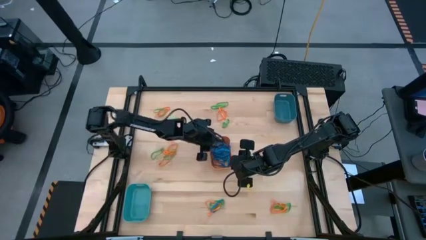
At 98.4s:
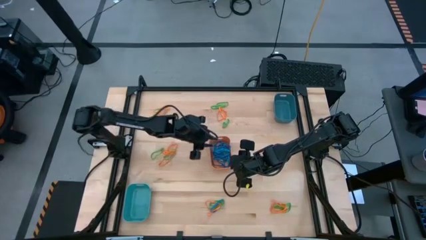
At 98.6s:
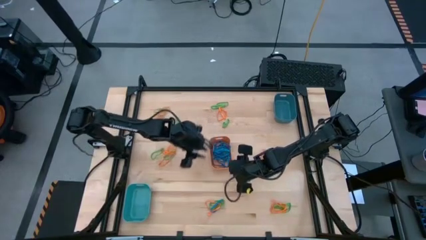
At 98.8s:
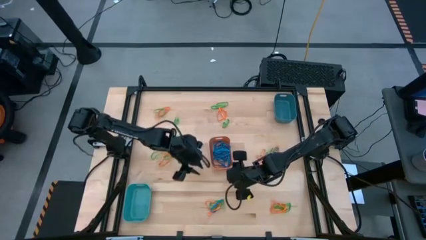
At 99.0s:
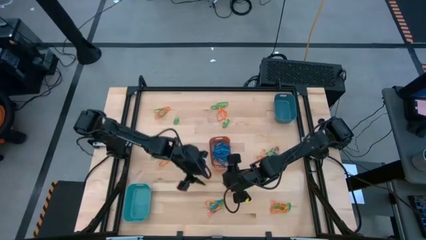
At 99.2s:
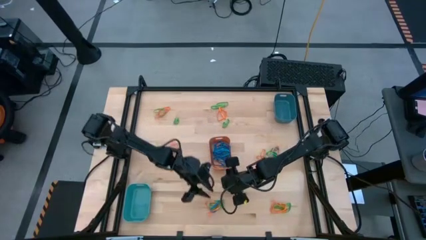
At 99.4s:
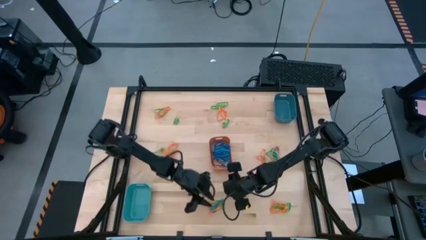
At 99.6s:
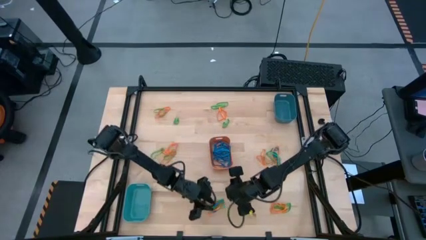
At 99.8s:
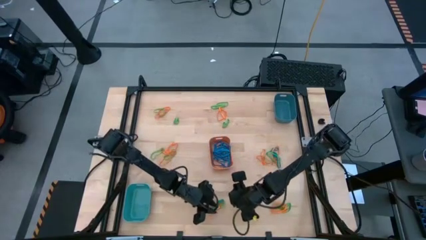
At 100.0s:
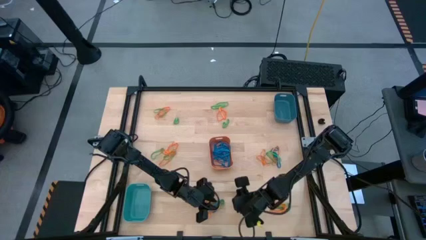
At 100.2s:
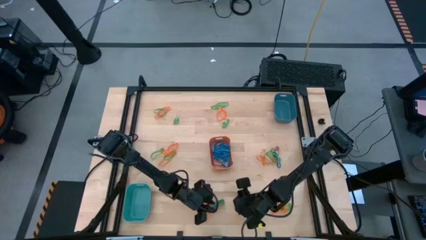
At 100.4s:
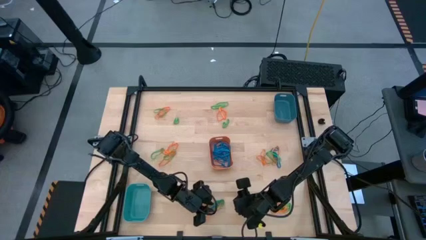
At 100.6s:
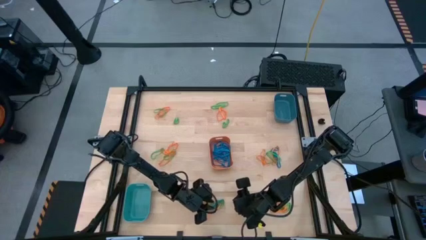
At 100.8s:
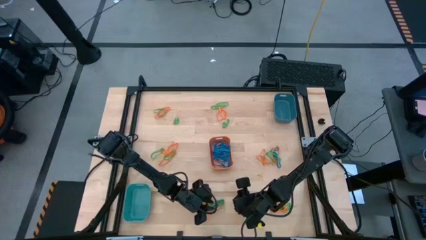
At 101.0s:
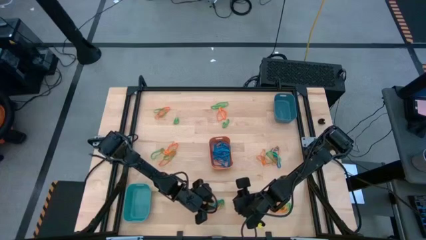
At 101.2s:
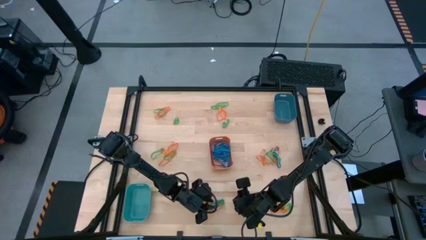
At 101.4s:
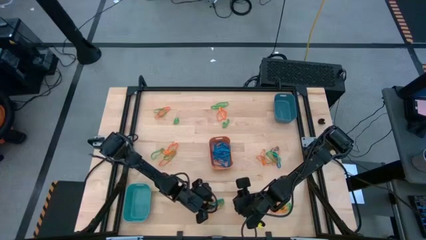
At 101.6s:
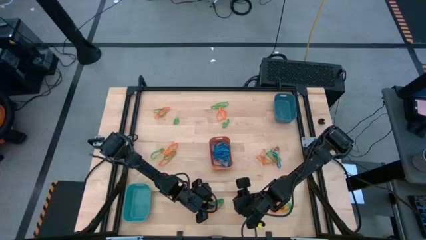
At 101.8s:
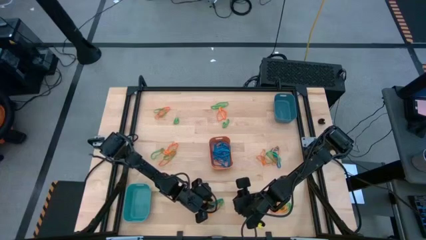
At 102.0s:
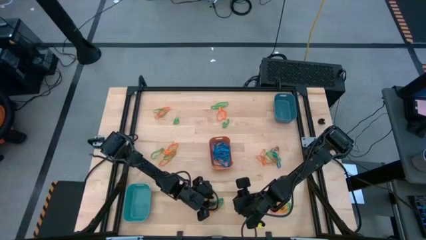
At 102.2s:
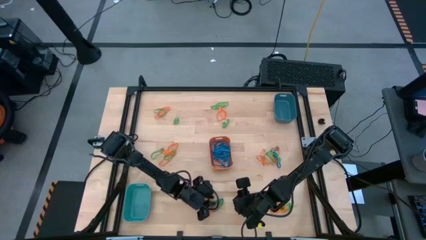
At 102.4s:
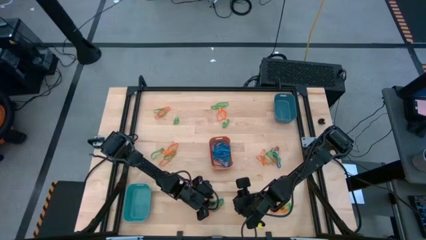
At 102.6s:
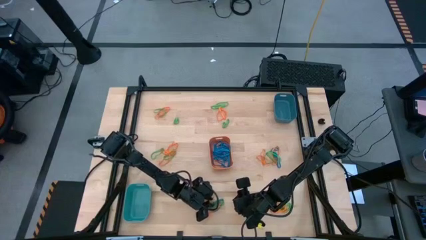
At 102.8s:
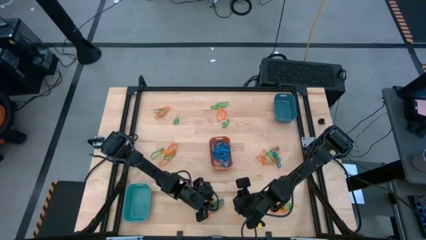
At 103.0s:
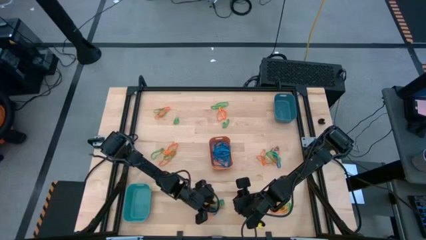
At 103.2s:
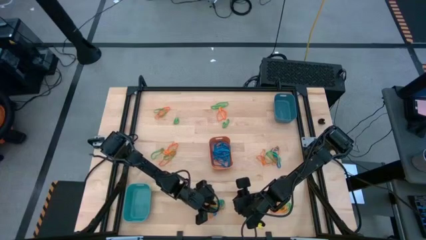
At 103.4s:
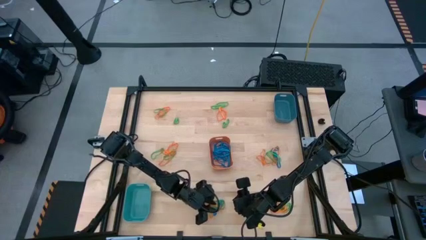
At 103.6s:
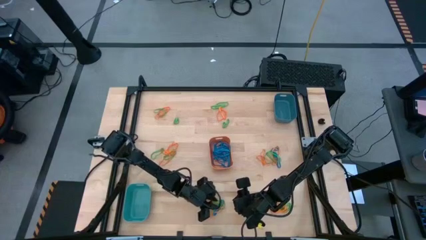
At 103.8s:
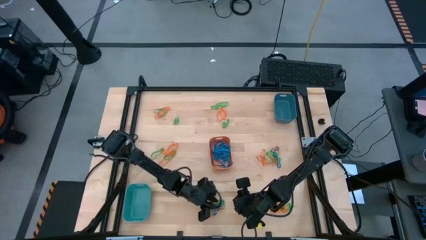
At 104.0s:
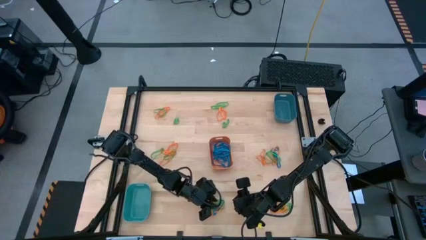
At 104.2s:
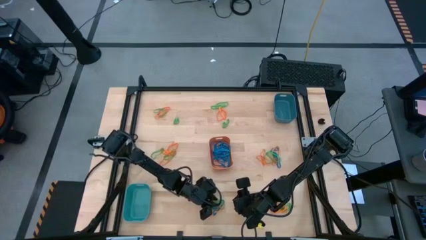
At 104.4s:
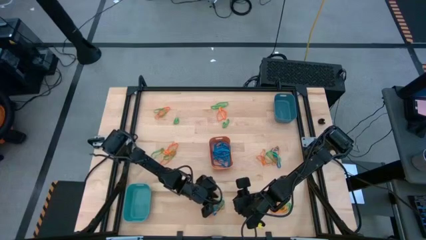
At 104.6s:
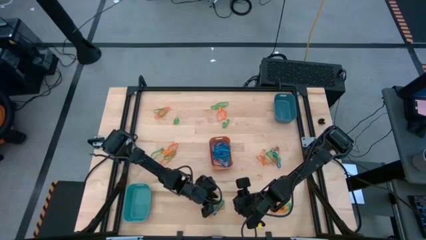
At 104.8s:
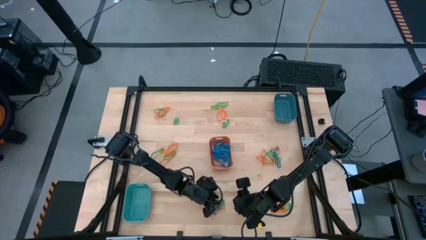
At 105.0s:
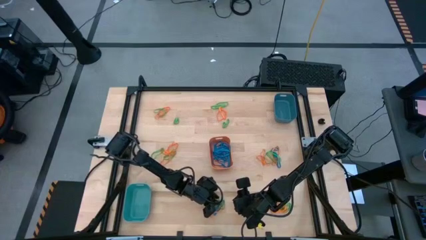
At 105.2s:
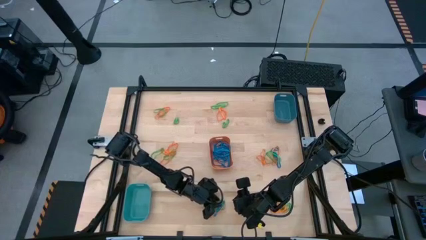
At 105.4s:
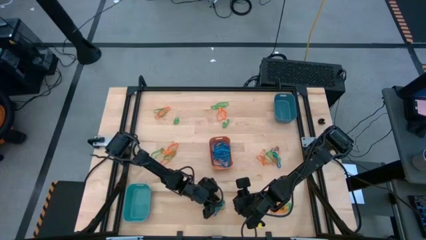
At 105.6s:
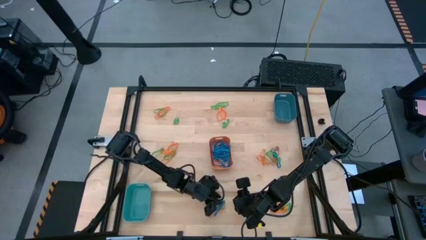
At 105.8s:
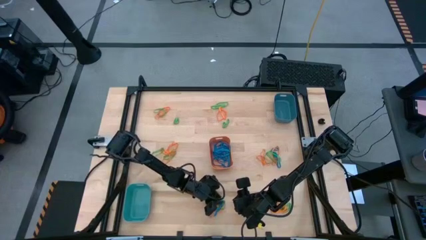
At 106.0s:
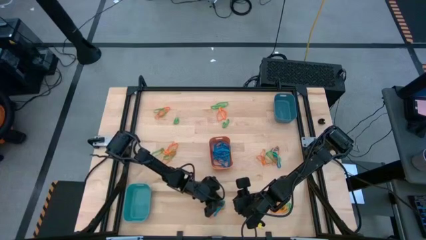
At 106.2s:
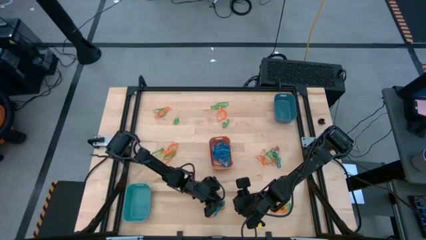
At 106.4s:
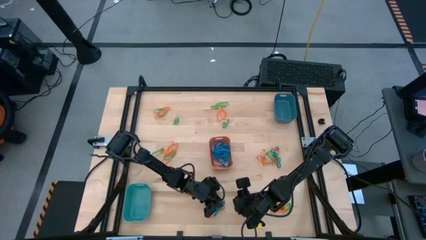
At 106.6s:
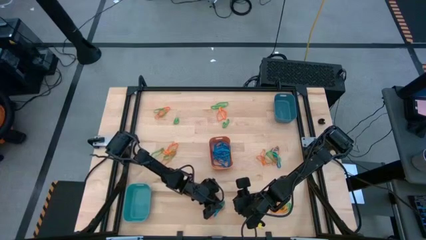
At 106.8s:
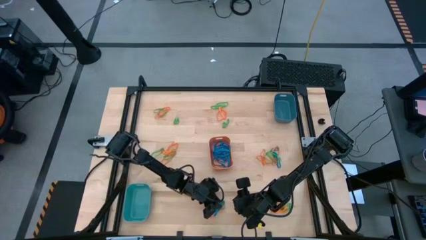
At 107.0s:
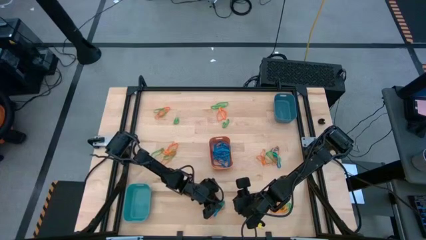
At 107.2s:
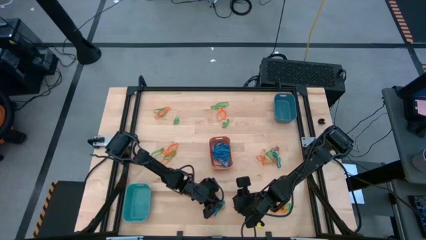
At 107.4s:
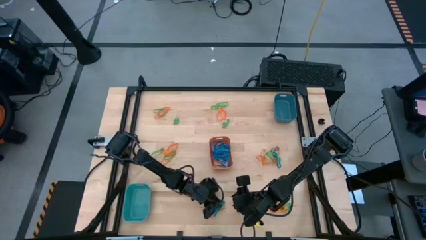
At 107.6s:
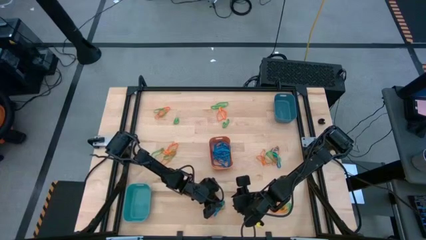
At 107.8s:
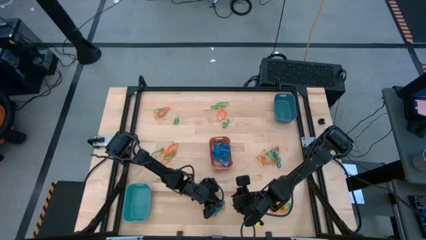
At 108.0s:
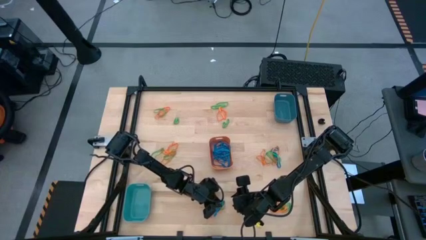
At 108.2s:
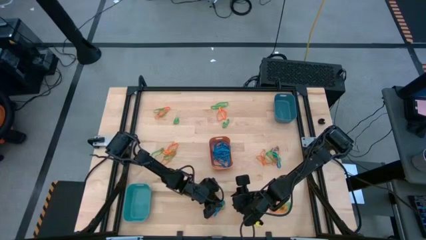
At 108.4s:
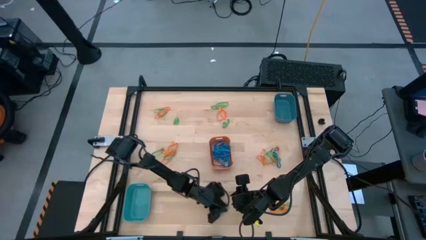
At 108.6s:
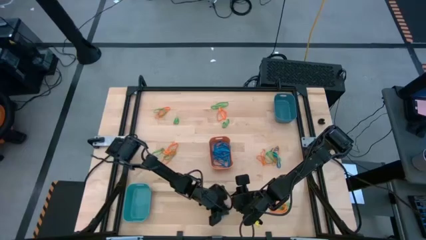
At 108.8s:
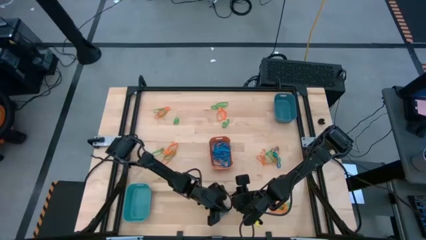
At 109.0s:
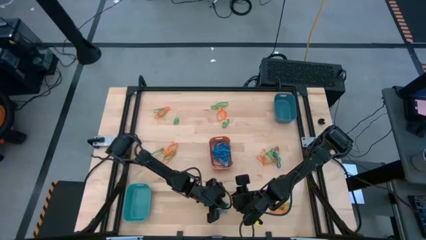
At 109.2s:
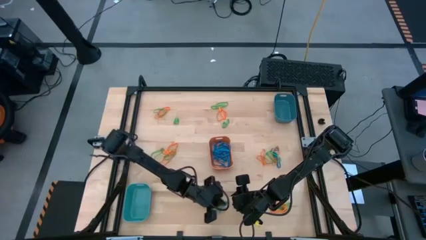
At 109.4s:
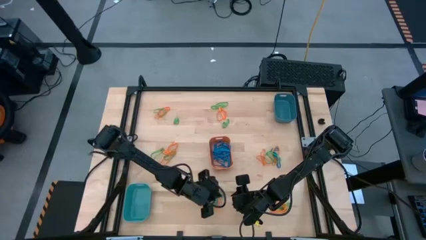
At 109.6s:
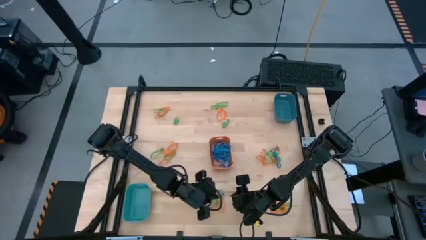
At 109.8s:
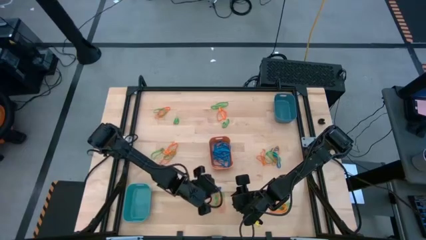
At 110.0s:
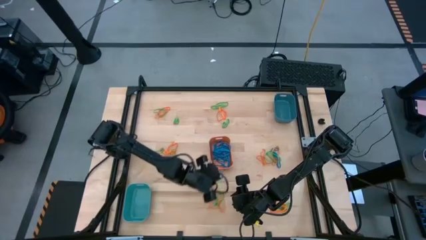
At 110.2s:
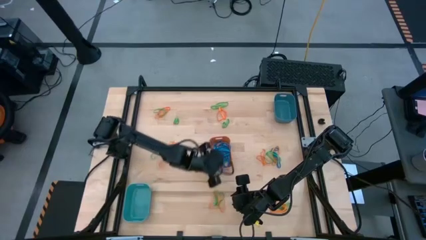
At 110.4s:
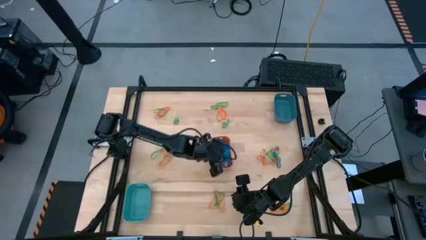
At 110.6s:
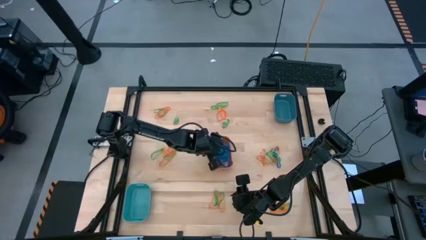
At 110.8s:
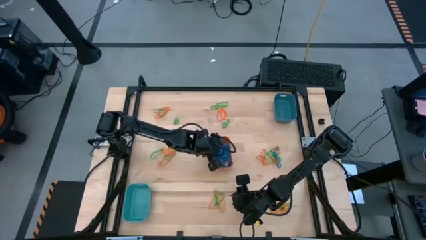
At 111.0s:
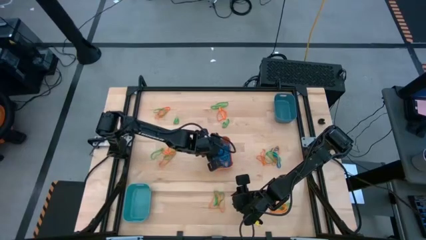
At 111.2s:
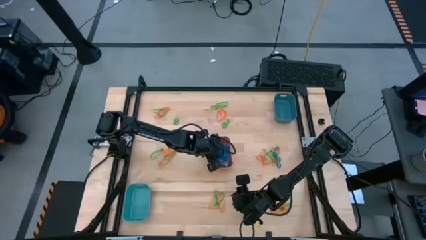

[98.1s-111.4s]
Task: Sort rubber bands into baskets
Put the blue rubber band into the orange bin
